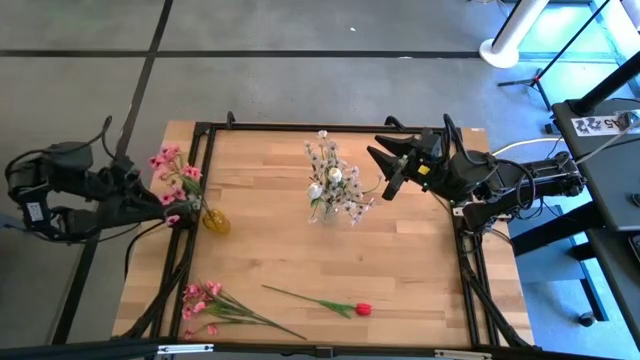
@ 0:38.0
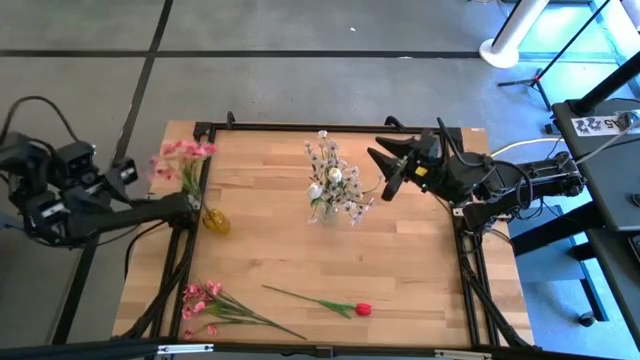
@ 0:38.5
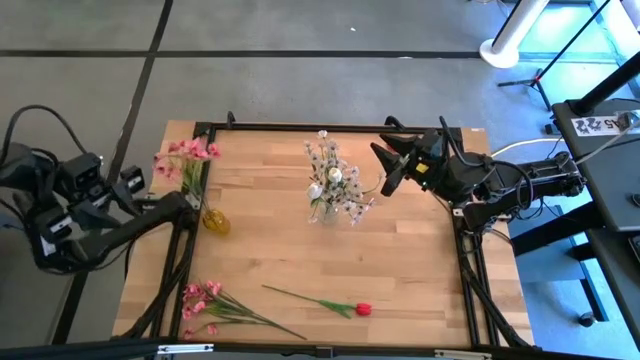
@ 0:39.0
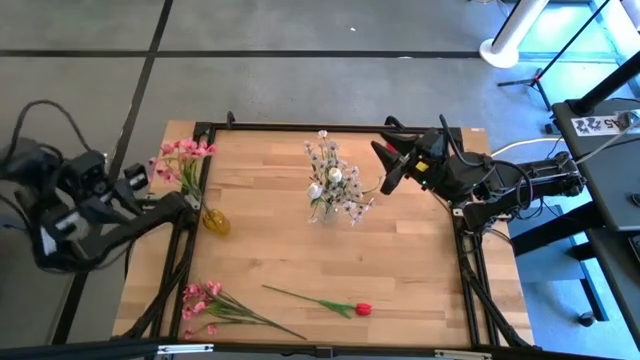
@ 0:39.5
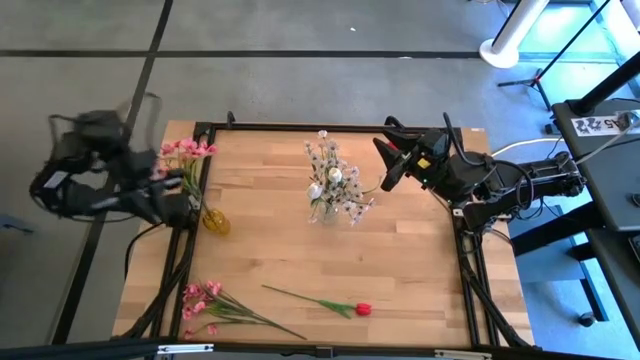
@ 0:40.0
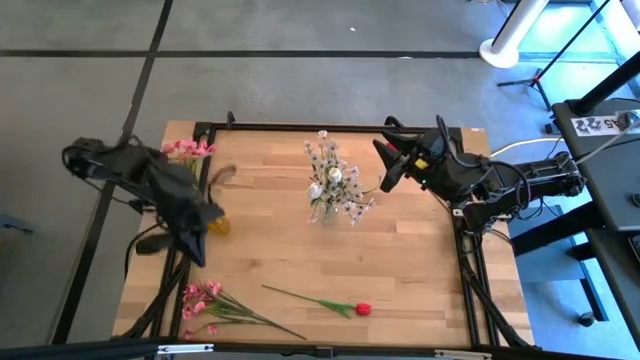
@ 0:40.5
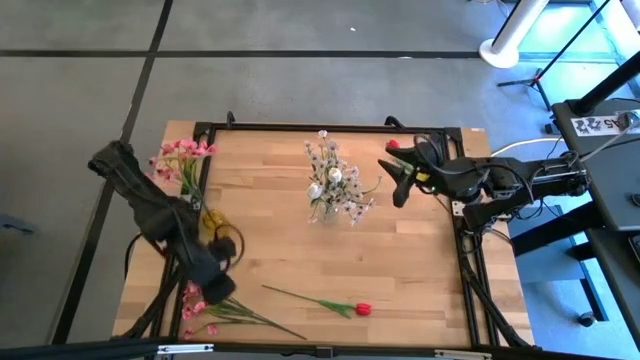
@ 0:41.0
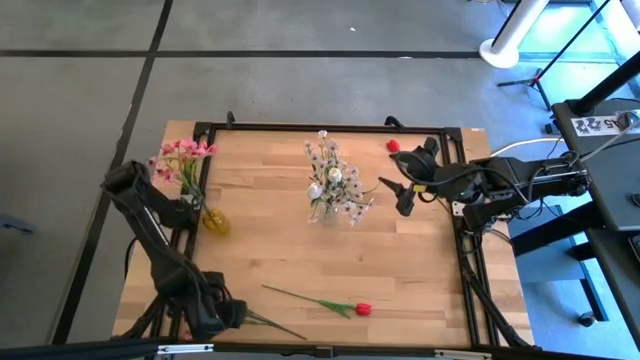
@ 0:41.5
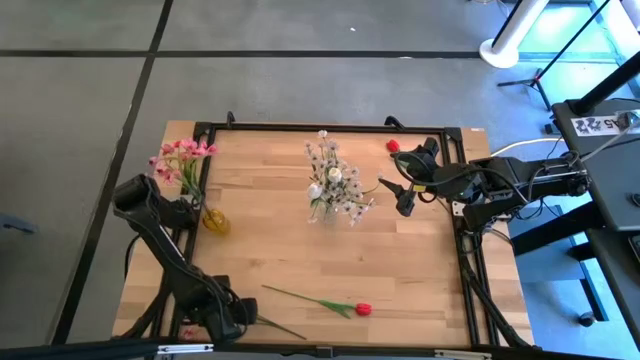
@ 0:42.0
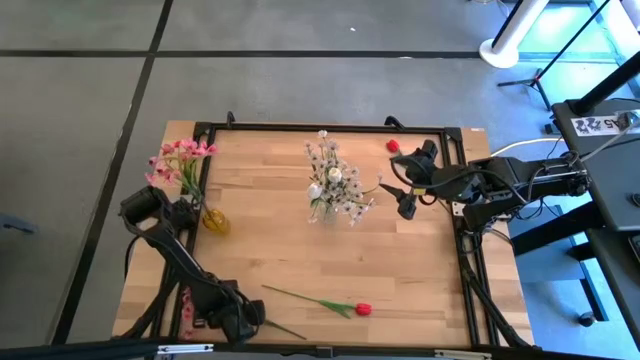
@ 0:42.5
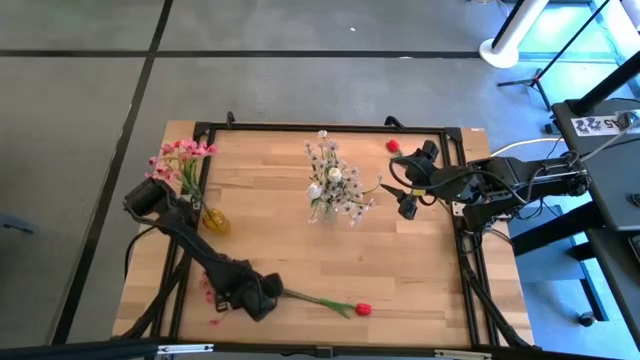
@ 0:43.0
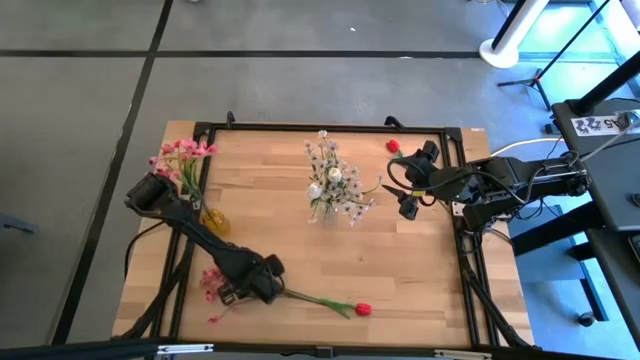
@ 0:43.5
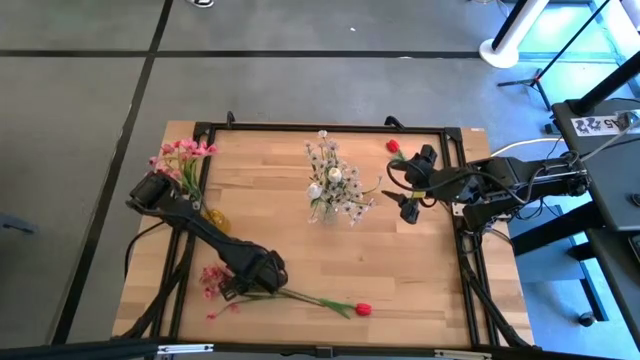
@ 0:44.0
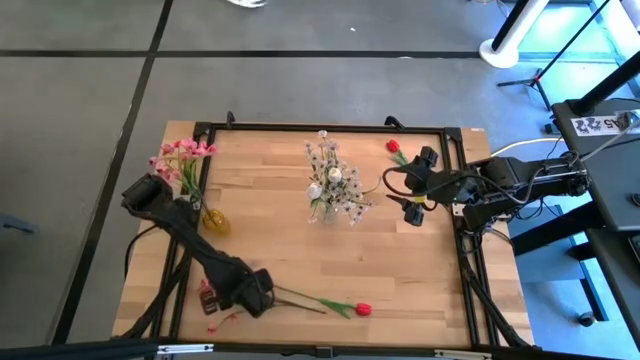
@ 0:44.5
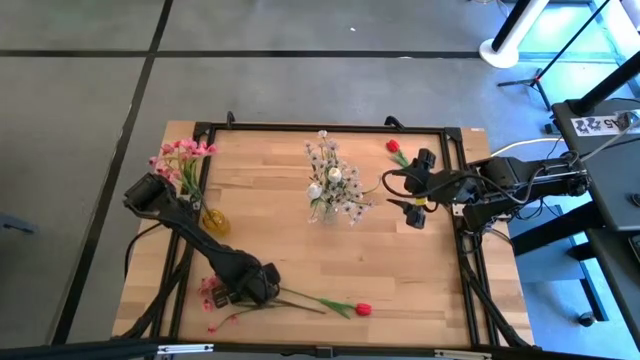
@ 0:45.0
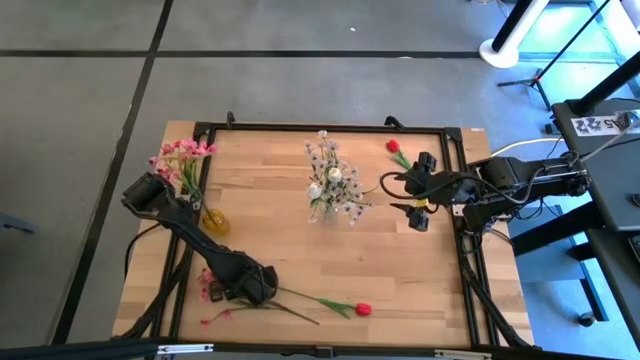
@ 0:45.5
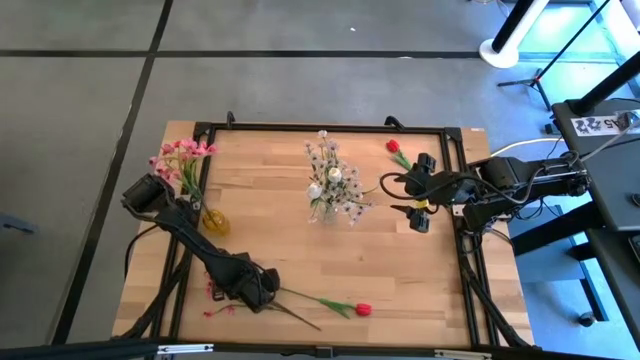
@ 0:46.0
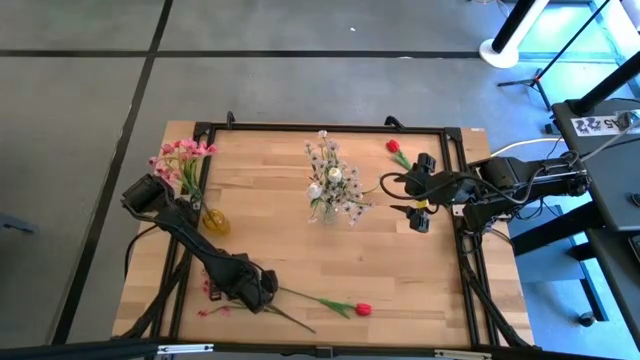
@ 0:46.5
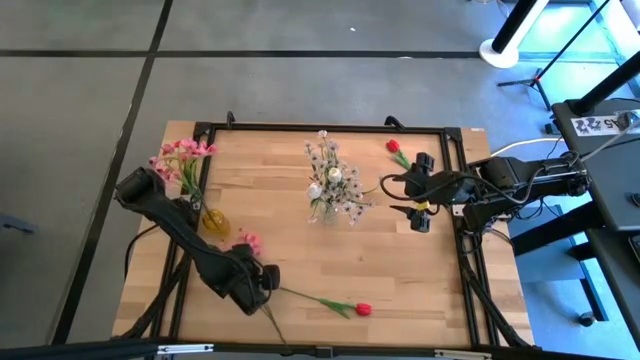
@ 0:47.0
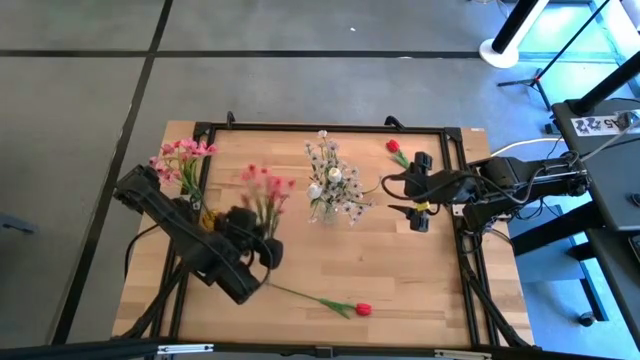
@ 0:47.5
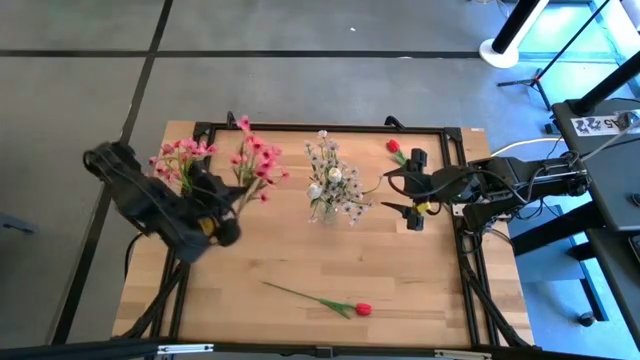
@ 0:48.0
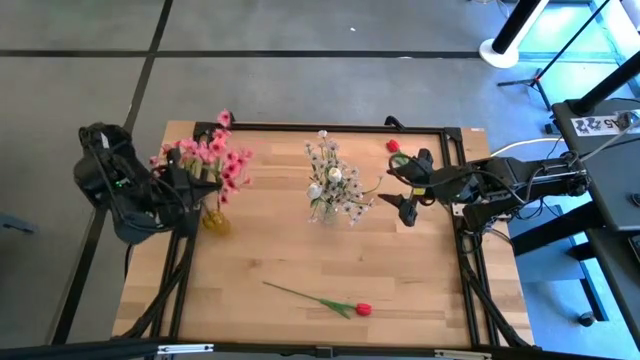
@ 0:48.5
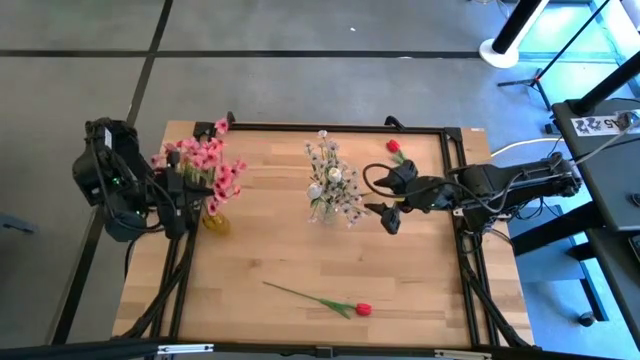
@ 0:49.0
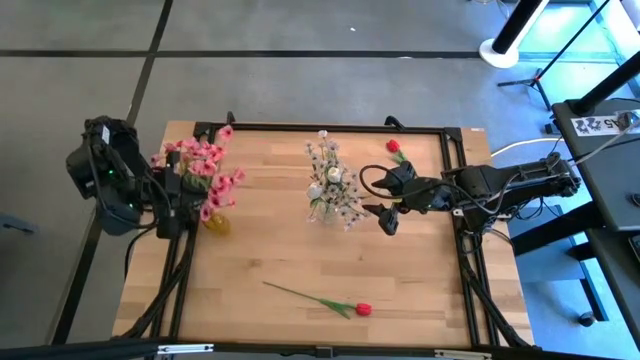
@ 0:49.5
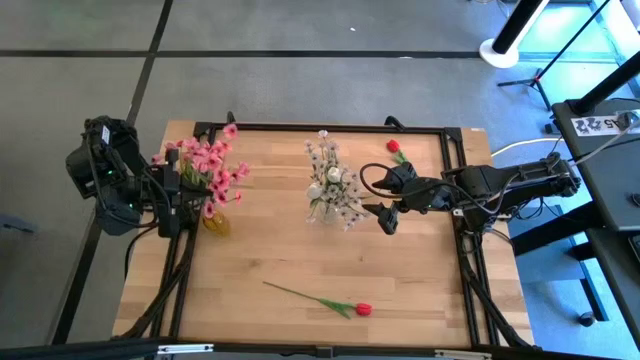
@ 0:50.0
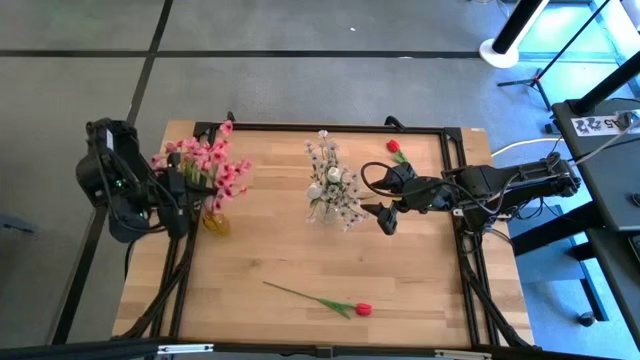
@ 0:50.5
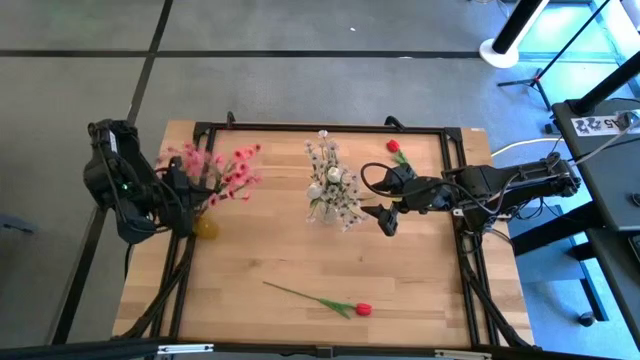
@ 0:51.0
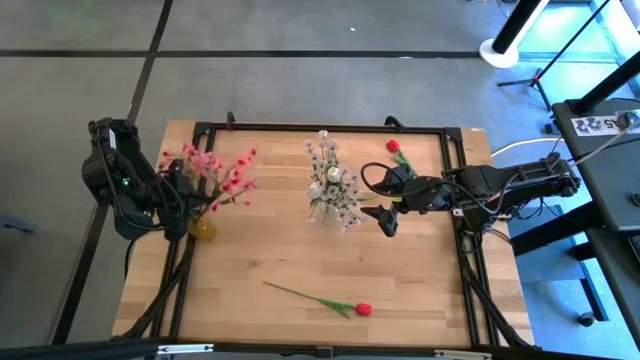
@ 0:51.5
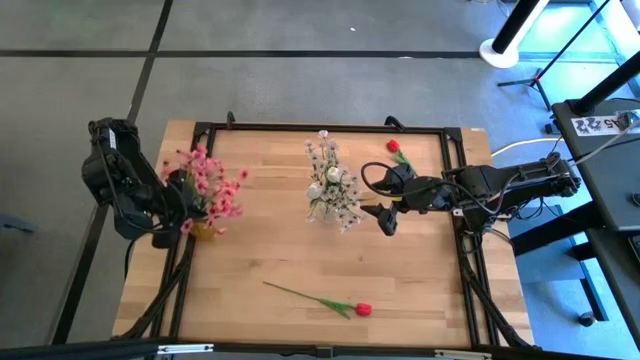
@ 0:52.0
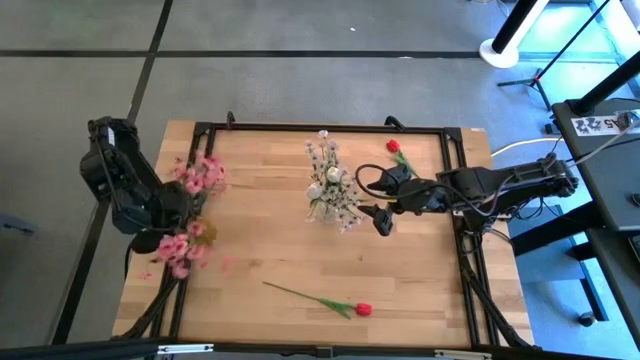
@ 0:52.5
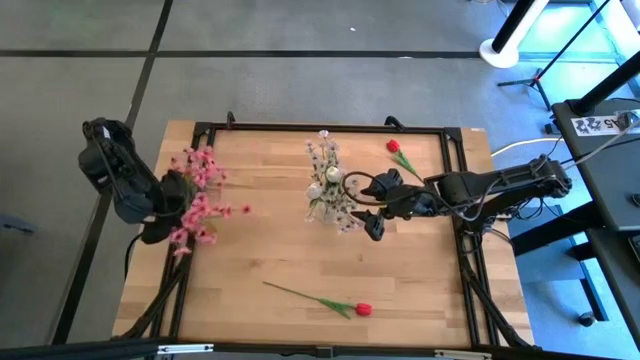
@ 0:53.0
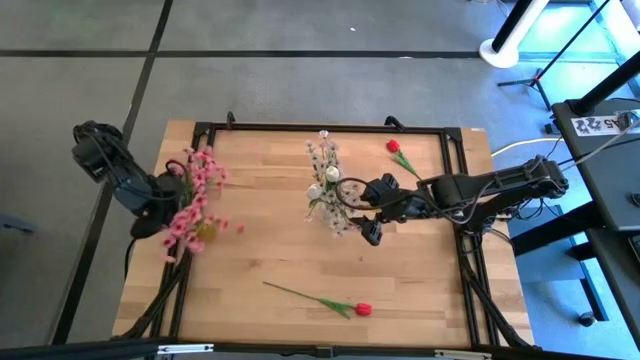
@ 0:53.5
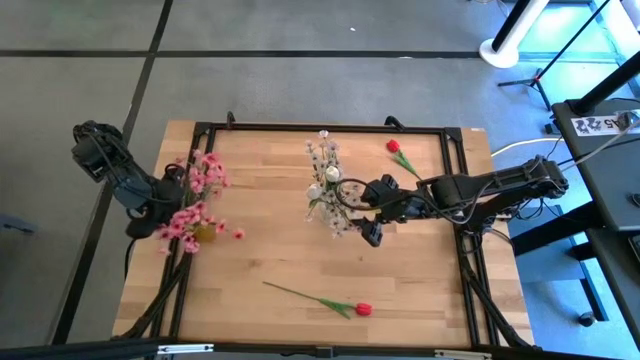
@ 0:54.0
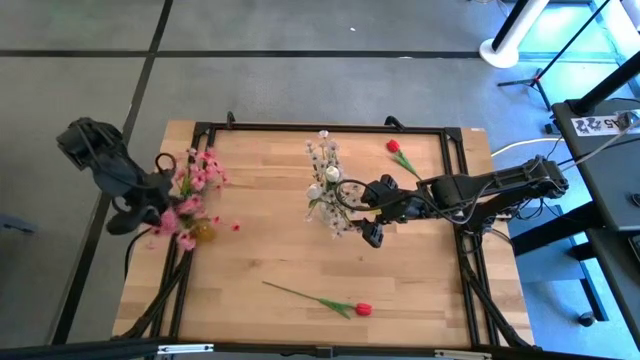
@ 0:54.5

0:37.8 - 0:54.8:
Task: Sort flowers into vase by color
Put the pink flowers into the yellow vase

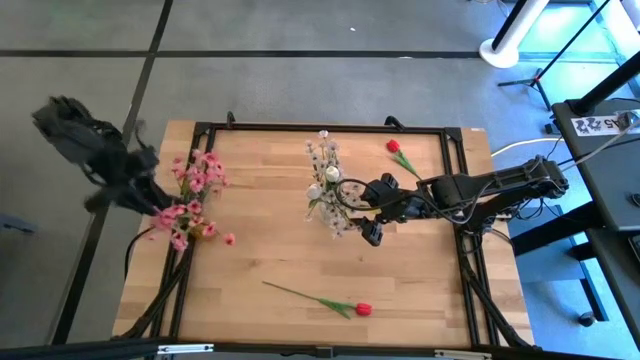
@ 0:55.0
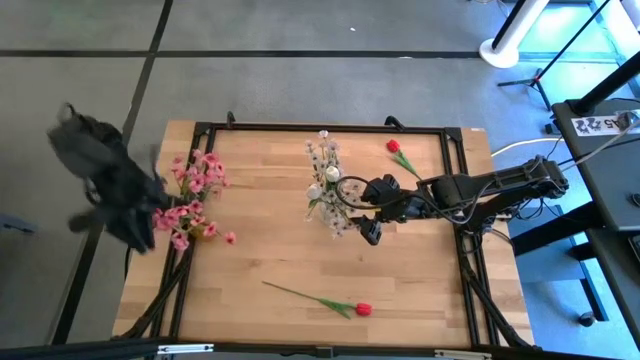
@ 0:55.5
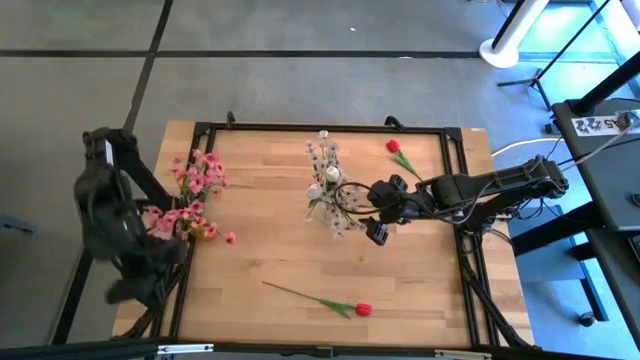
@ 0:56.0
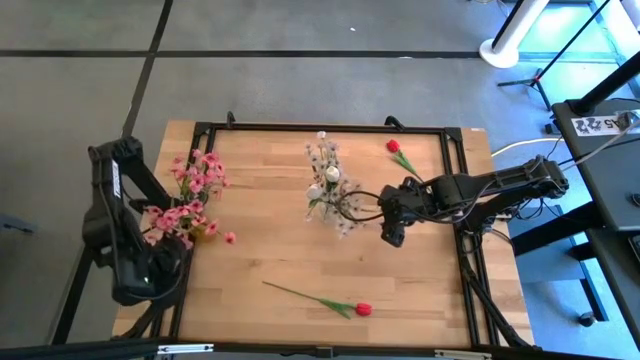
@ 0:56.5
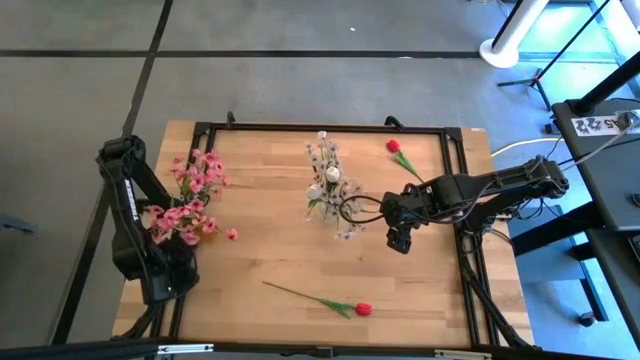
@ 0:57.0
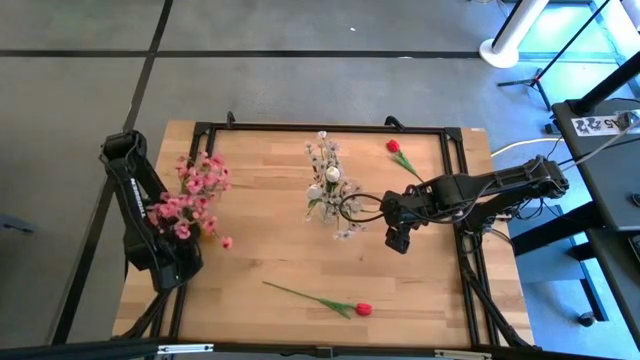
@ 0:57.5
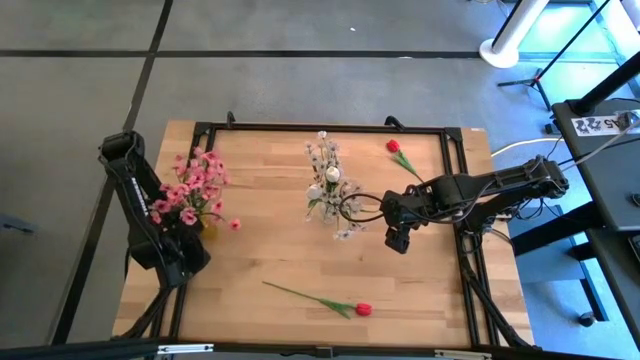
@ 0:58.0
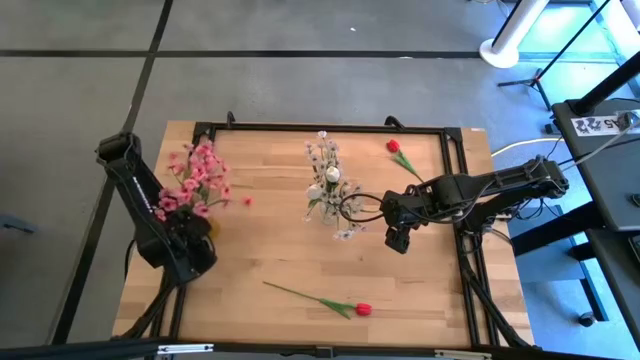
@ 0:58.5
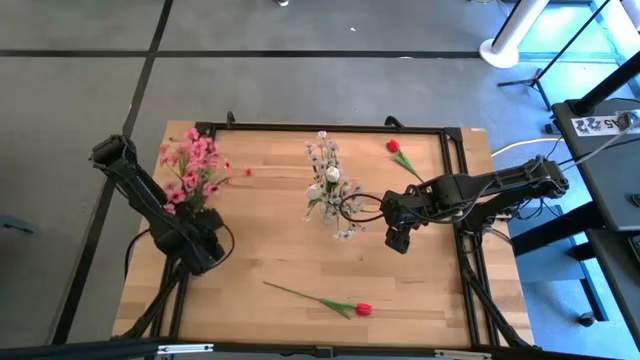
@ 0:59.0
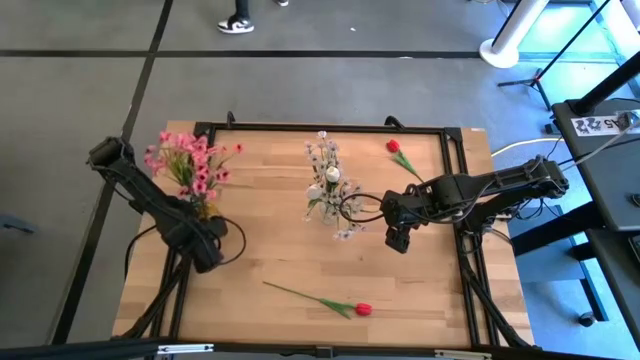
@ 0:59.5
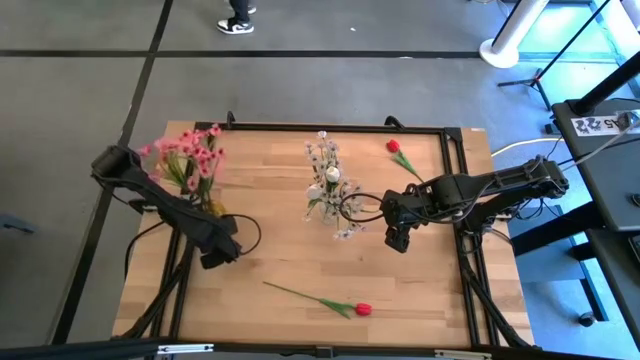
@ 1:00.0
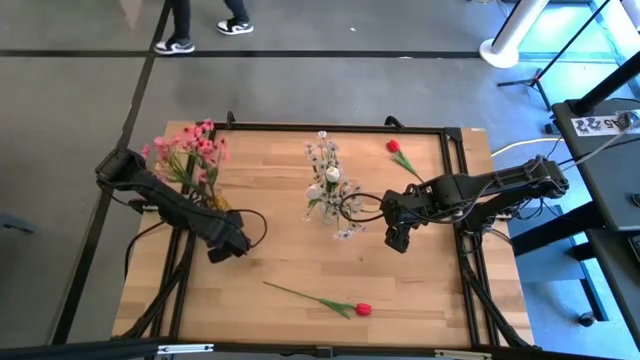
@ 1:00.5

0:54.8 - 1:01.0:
Adjust the yellow vase
